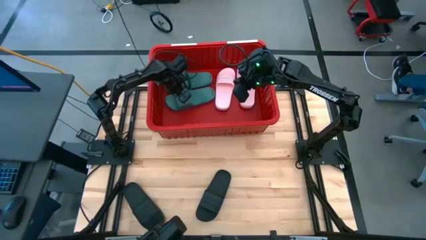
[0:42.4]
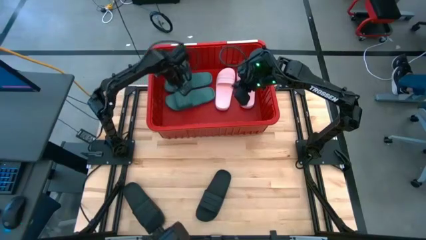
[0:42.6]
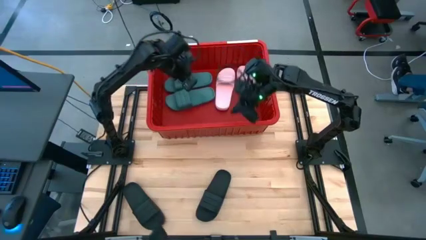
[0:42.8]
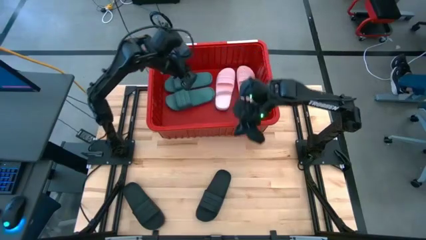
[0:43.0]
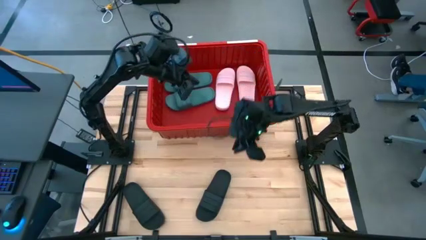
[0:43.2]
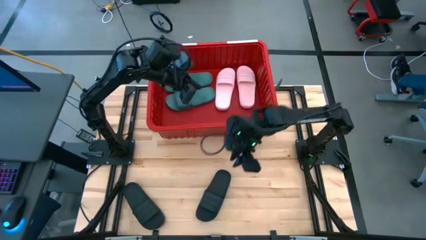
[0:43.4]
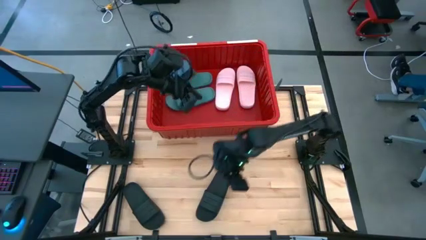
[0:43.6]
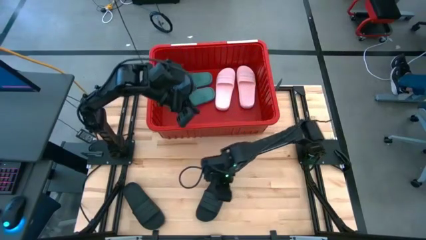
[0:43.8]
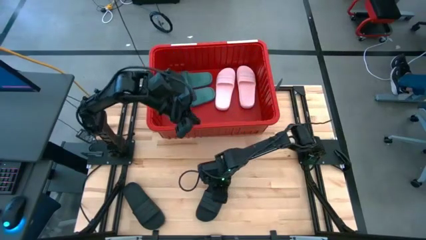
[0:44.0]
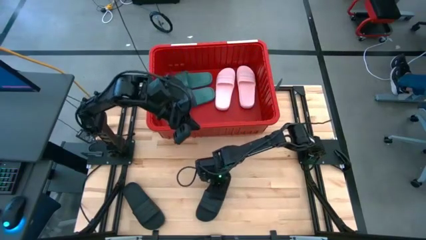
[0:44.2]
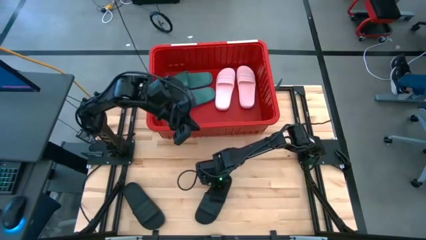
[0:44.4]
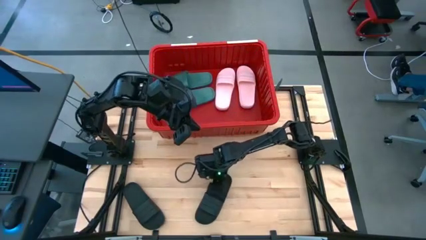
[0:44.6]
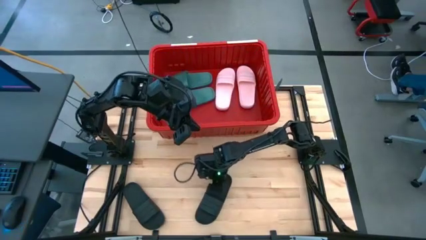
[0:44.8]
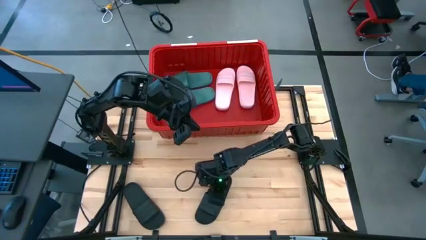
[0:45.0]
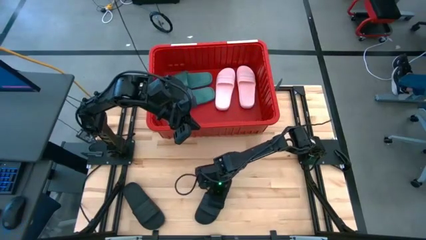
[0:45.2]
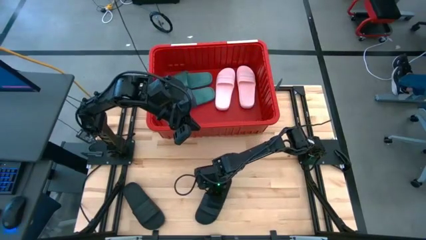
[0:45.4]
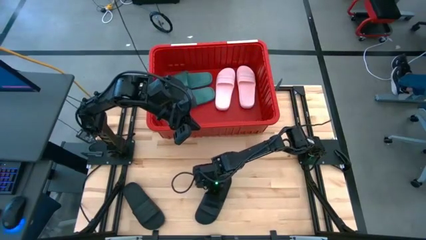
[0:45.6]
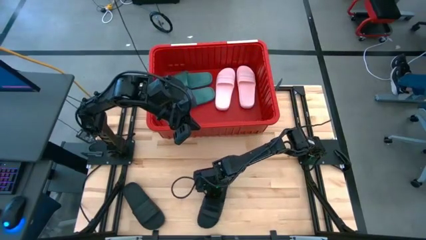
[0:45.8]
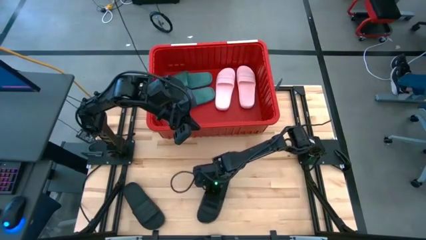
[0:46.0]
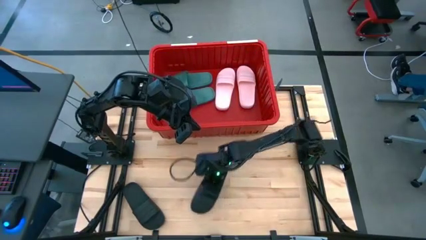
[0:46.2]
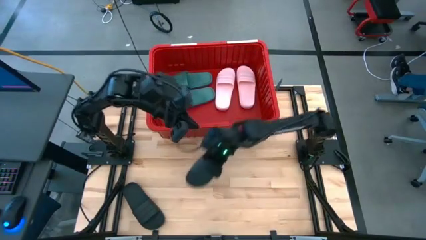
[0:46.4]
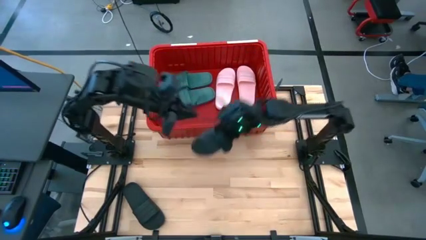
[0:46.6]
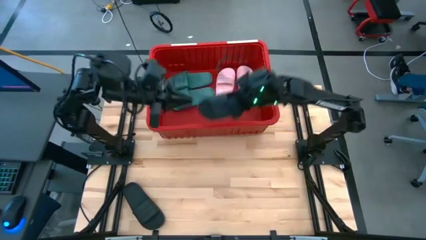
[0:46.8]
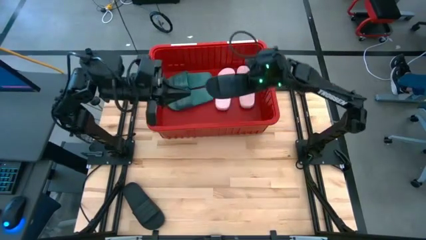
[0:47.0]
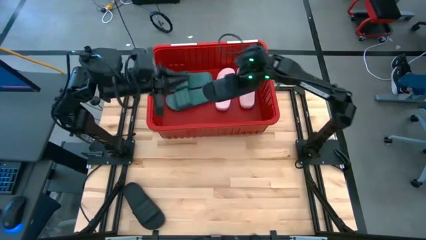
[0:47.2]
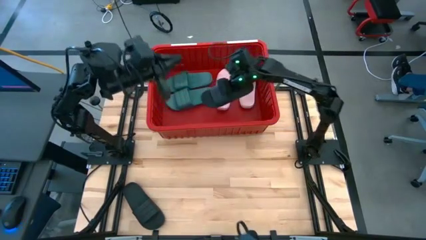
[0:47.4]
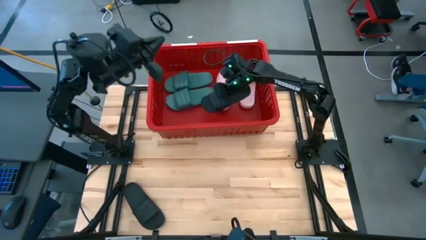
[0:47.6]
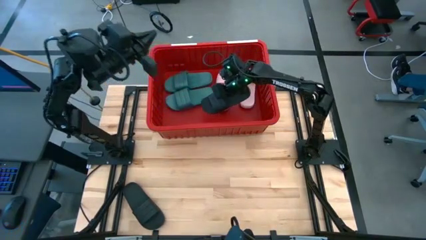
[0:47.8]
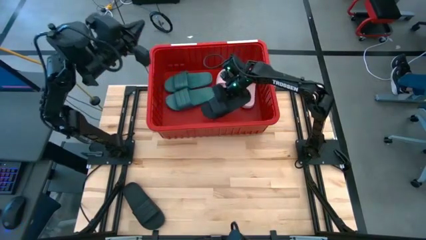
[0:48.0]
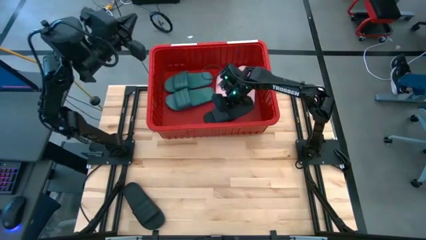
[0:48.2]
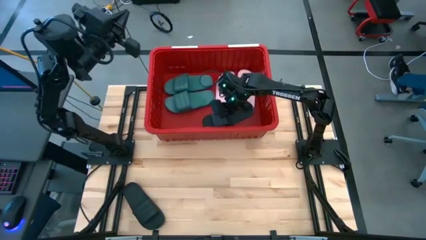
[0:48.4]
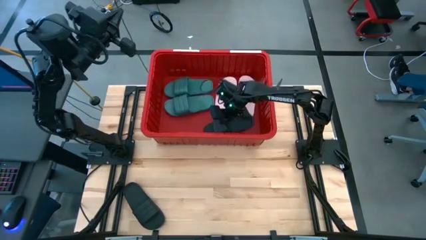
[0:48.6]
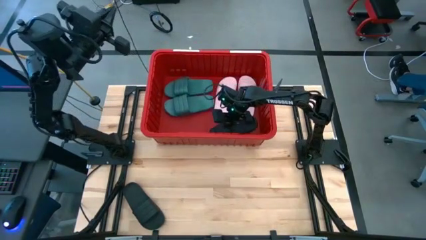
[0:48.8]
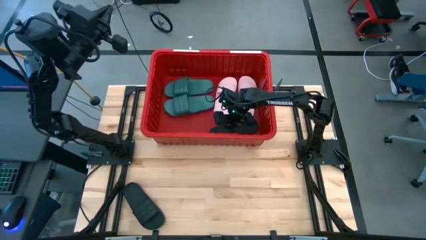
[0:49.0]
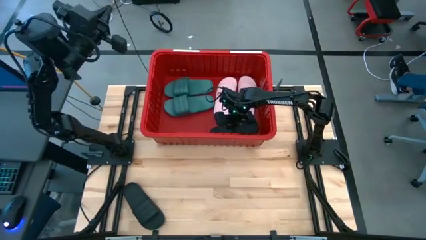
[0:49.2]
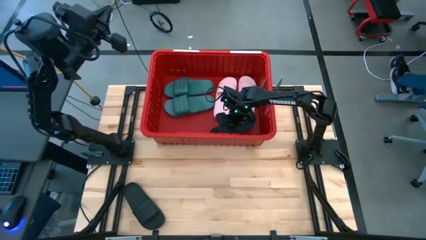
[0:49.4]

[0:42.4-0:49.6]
Task: Pick and place slides into bin
Put the right black slide into the red container

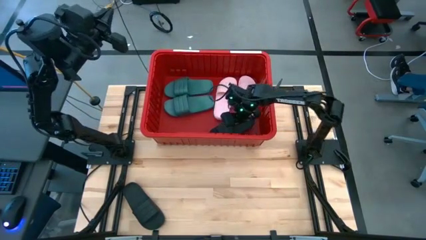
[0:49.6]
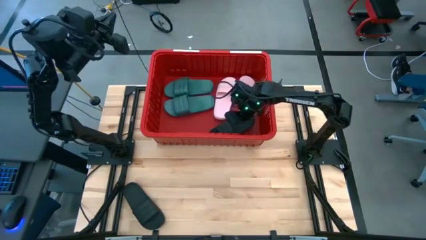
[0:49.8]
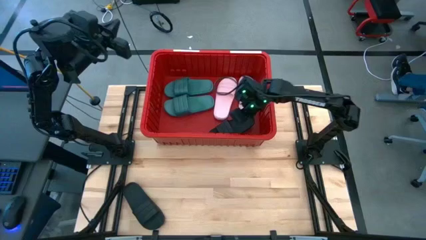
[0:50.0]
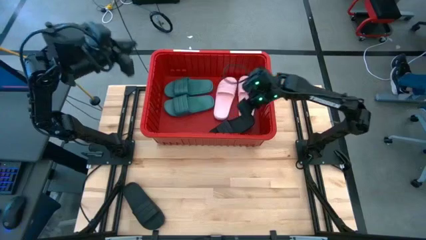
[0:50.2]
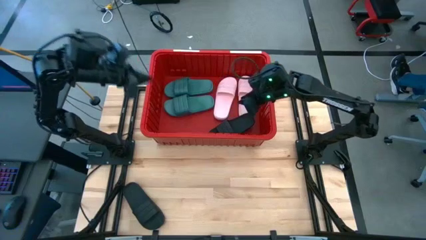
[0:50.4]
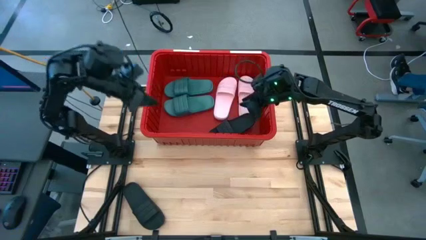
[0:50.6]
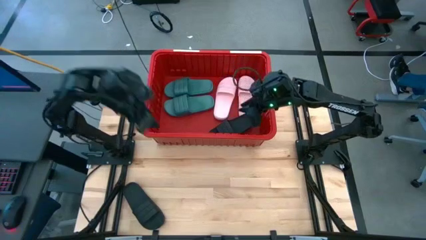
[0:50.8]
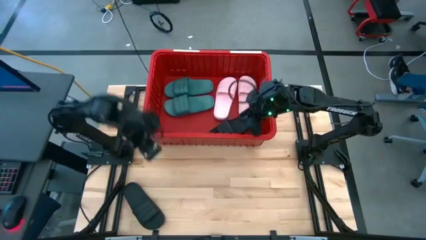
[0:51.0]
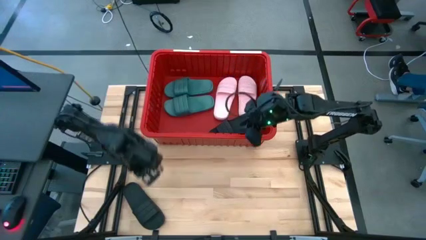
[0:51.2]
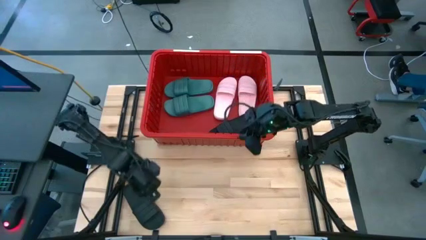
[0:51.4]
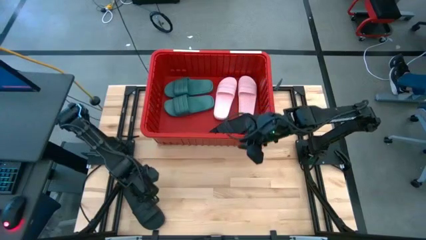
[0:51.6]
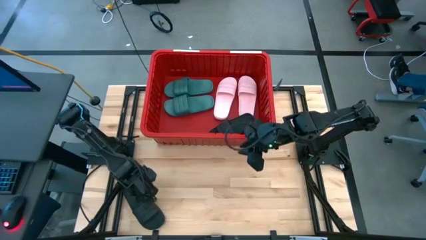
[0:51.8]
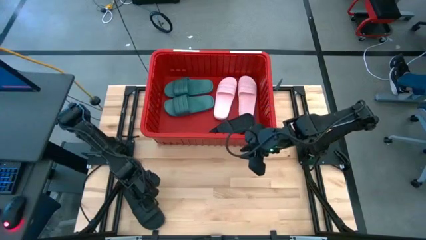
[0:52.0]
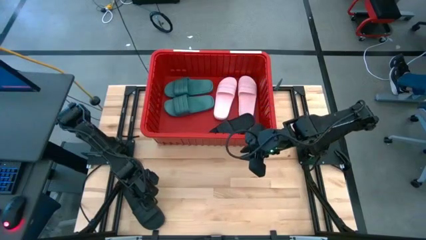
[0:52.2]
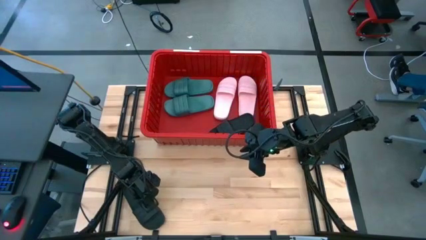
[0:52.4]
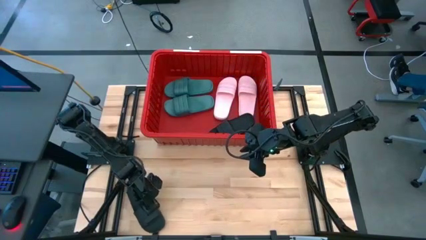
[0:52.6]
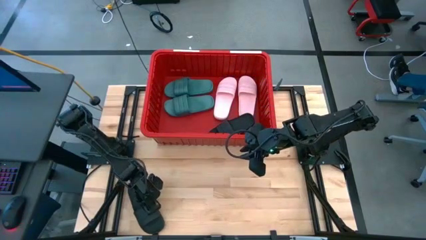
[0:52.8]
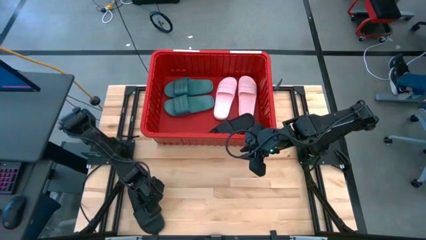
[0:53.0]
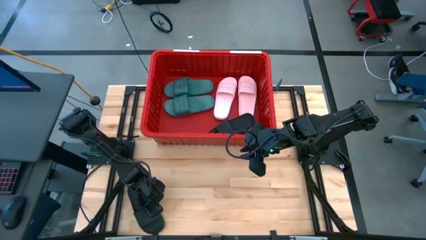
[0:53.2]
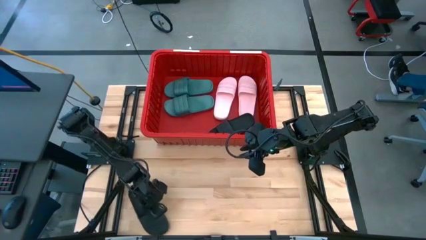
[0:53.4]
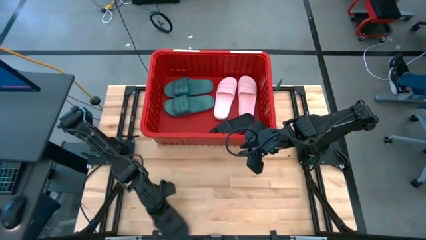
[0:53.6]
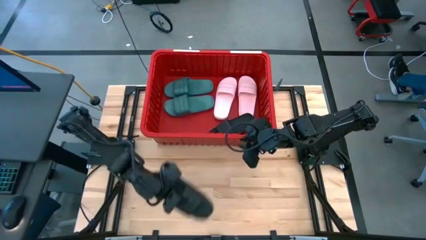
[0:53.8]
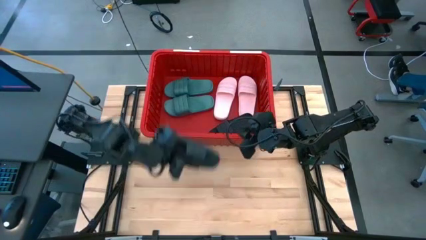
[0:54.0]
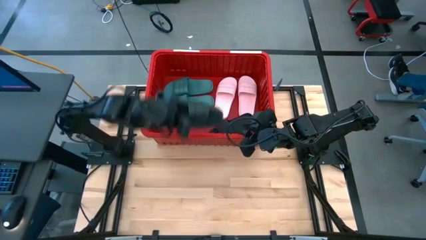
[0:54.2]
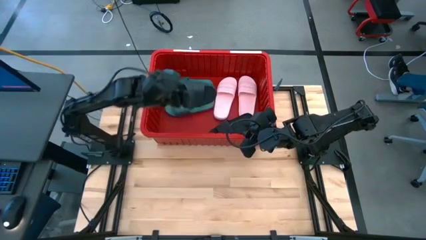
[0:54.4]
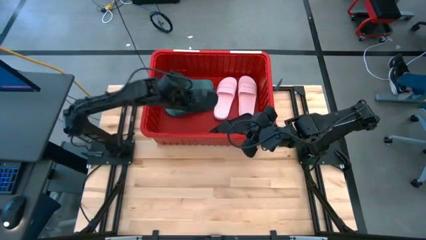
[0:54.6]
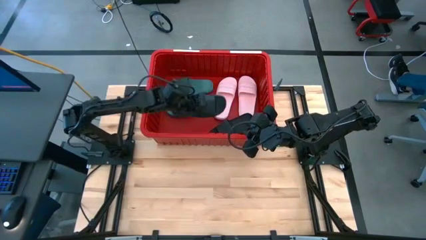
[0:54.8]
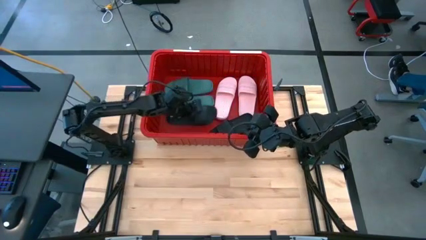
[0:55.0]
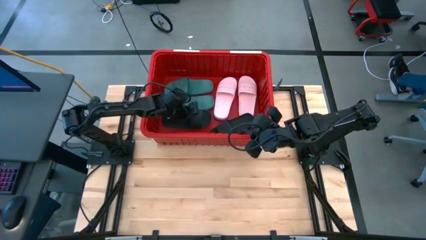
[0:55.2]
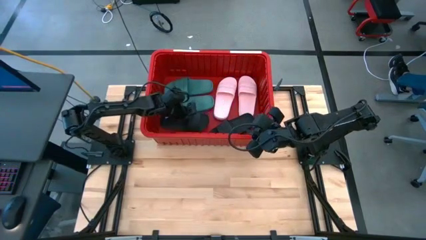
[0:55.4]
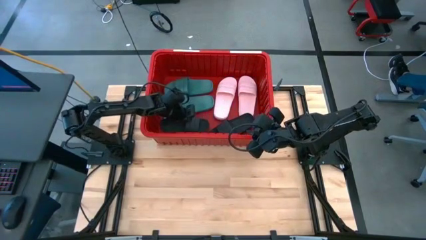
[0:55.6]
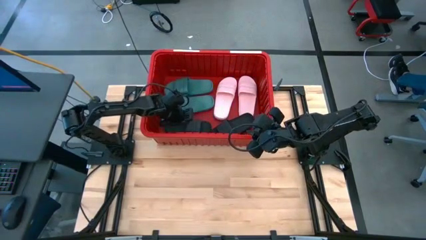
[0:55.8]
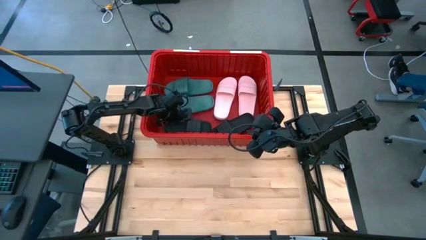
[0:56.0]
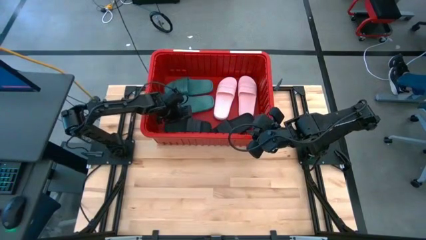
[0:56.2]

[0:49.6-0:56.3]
Put the black slide into the red container

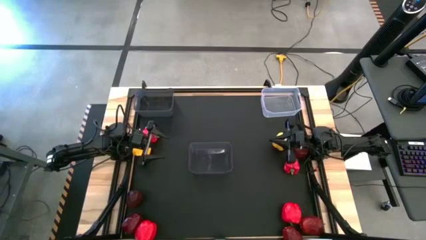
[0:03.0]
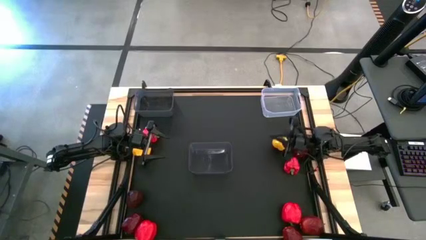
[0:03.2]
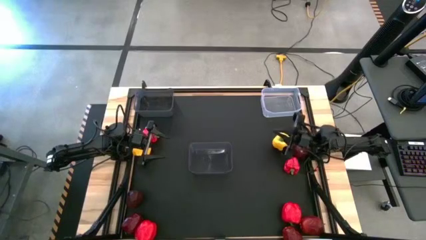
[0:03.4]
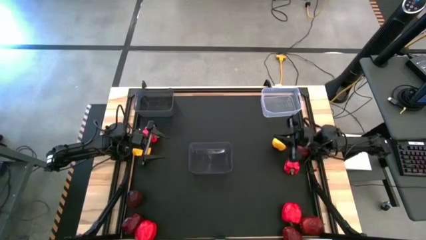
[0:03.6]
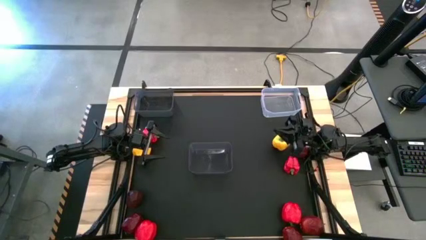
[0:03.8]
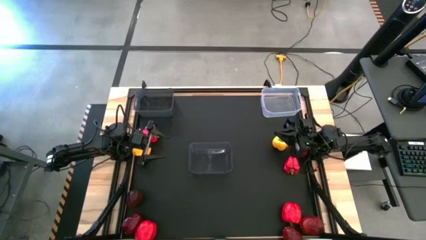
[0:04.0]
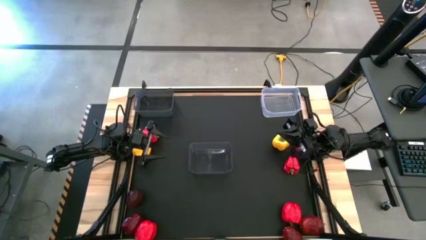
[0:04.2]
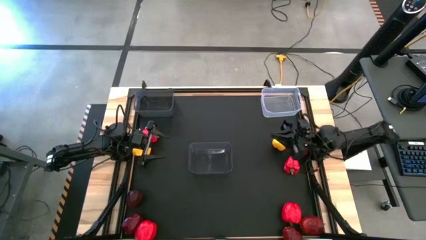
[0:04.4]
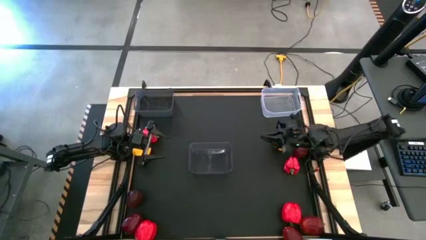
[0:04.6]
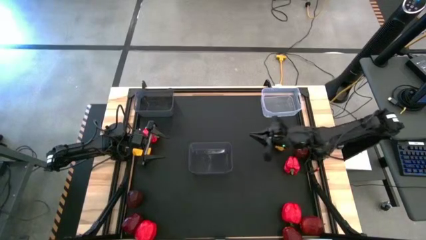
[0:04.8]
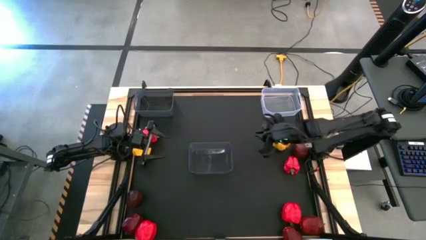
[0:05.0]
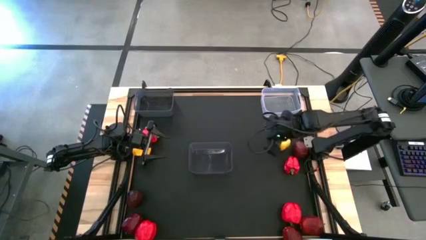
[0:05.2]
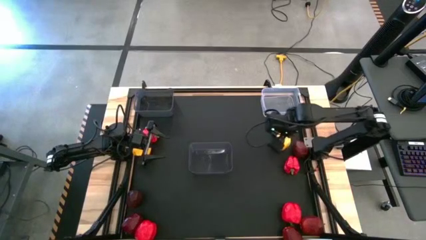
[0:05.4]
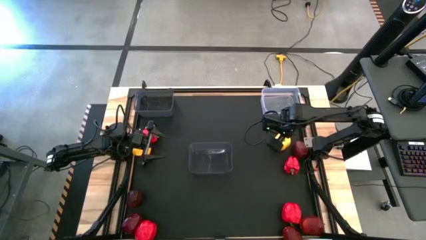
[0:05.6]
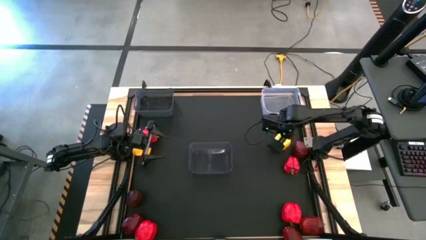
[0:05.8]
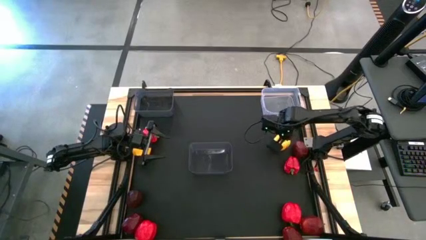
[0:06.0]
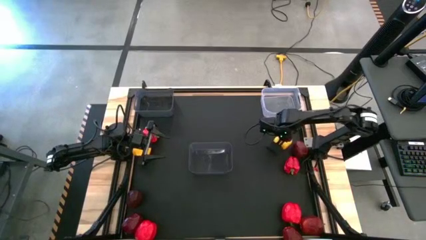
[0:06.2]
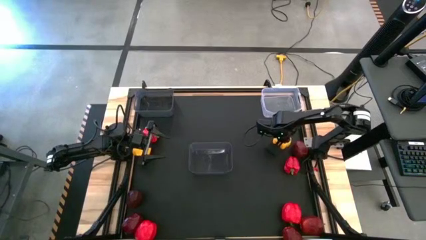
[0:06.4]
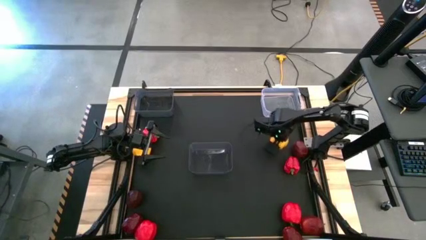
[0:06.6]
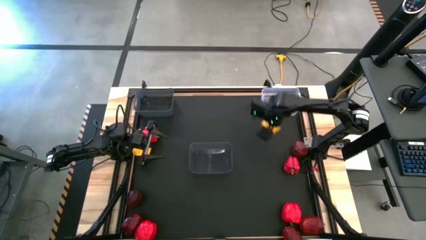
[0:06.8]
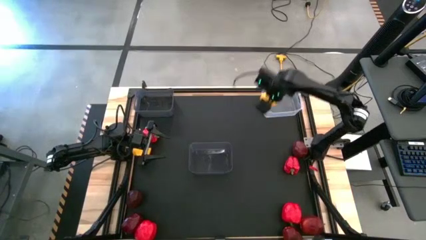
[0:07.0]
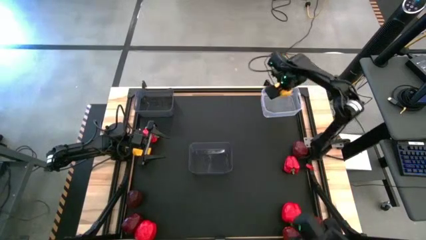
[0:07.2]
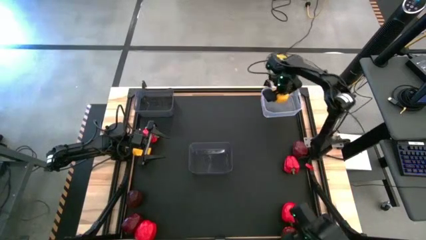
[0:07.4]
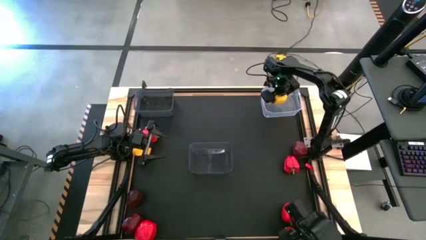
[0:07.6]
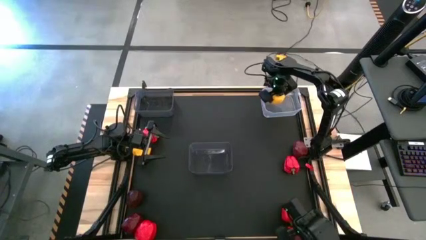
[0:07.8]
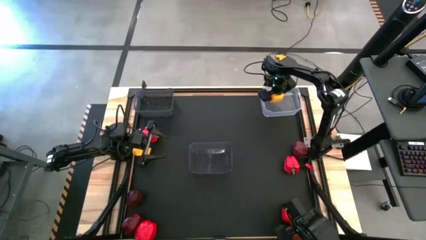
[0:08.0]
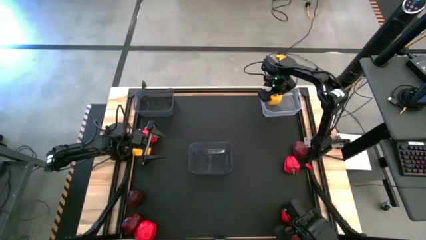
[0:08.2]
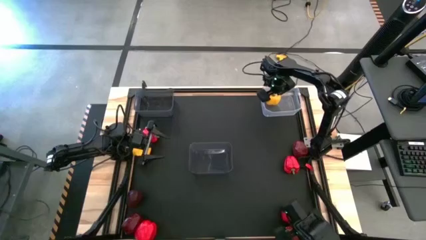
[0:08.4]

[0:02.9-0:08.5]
Task: Sort produce into baskets
Put the yellow bell pepper into the transparent bin
